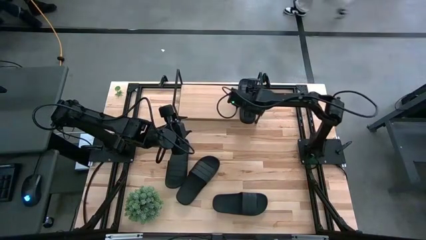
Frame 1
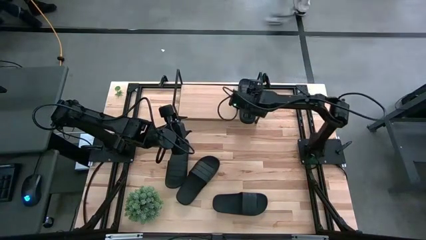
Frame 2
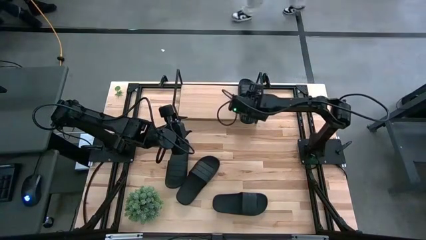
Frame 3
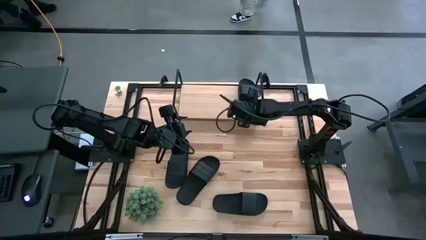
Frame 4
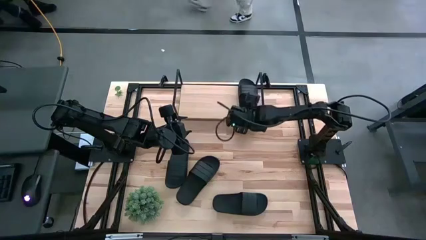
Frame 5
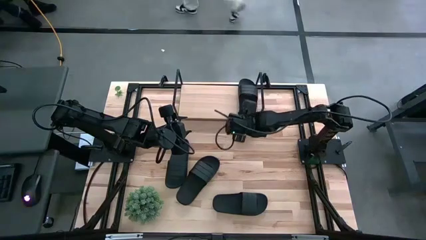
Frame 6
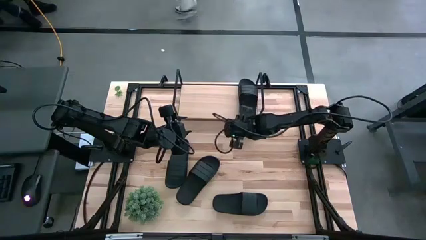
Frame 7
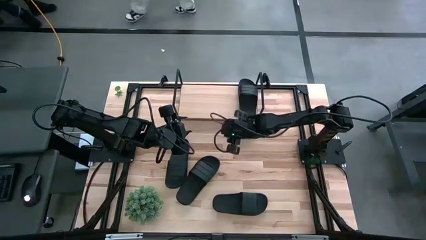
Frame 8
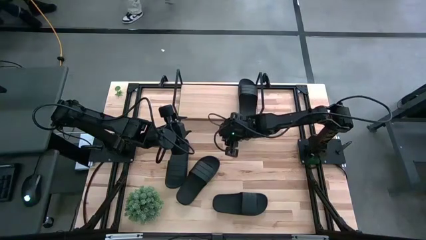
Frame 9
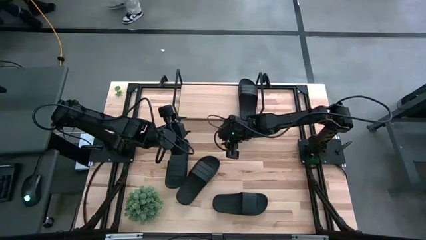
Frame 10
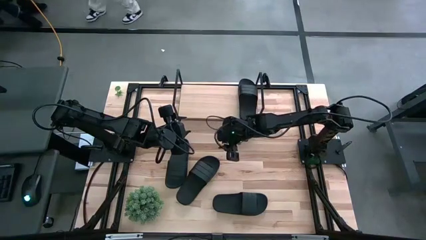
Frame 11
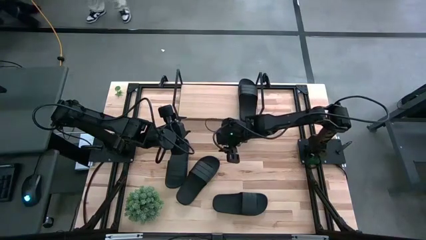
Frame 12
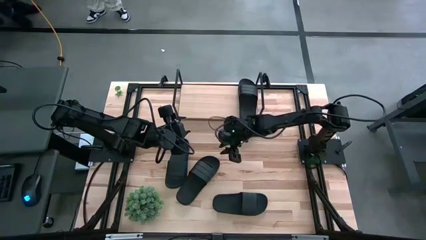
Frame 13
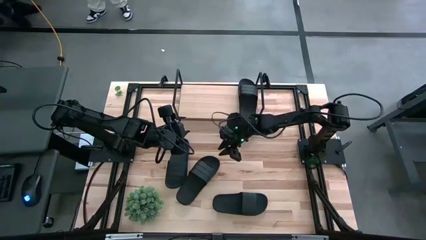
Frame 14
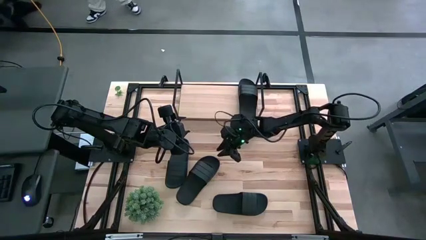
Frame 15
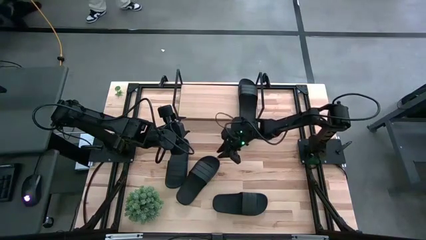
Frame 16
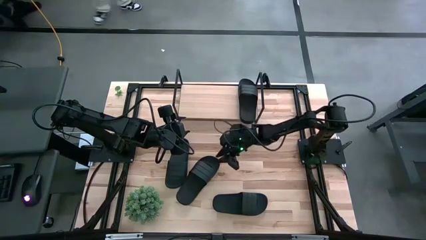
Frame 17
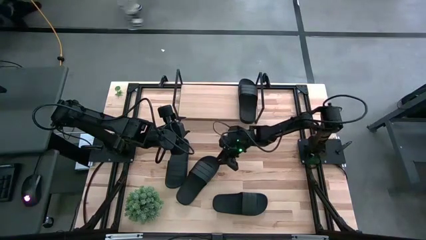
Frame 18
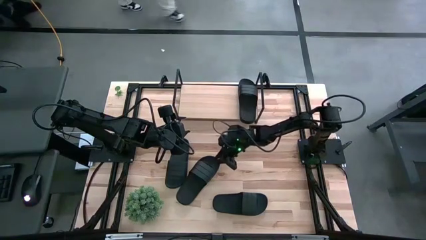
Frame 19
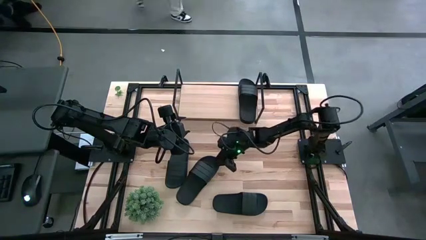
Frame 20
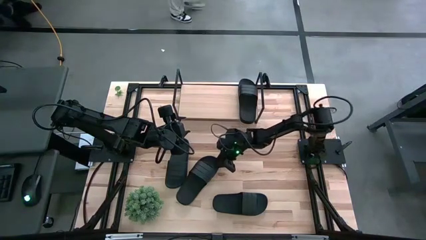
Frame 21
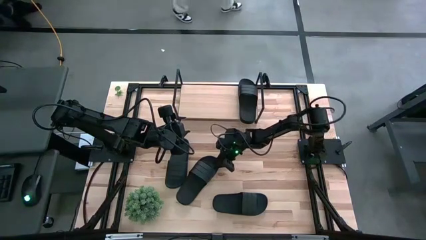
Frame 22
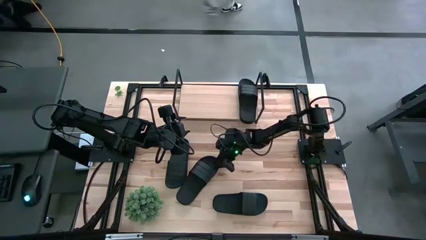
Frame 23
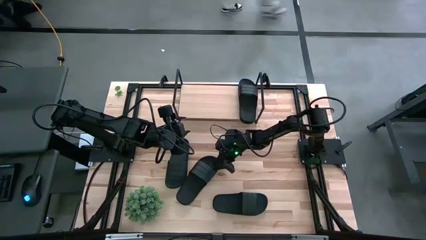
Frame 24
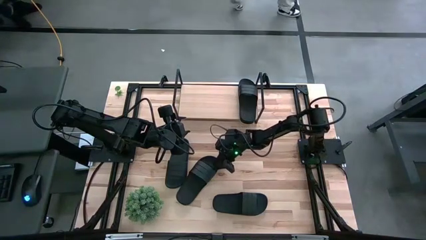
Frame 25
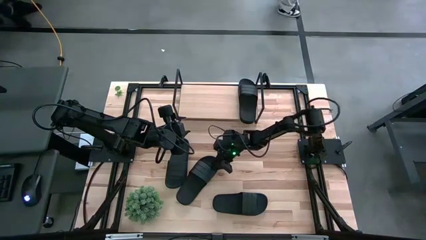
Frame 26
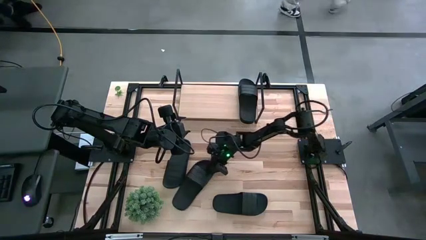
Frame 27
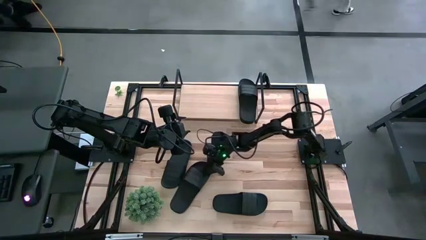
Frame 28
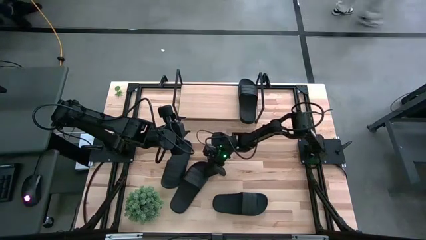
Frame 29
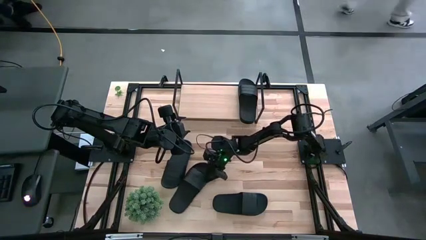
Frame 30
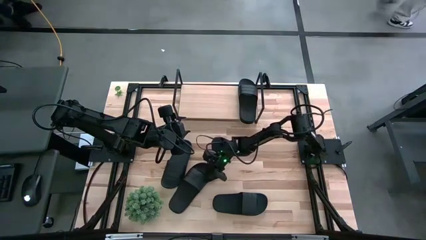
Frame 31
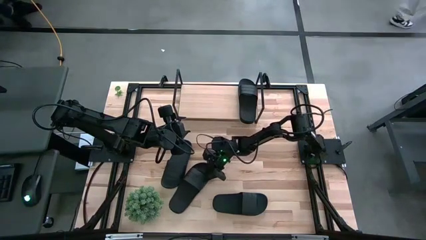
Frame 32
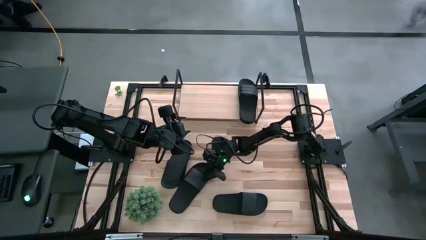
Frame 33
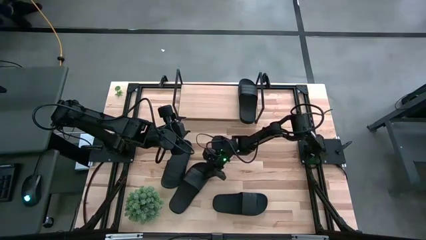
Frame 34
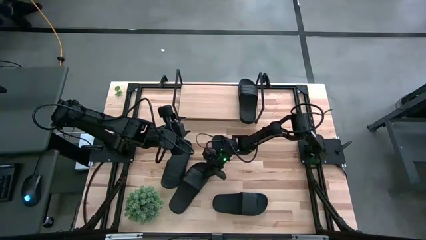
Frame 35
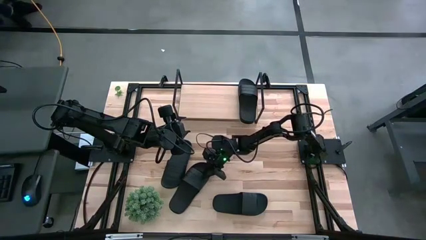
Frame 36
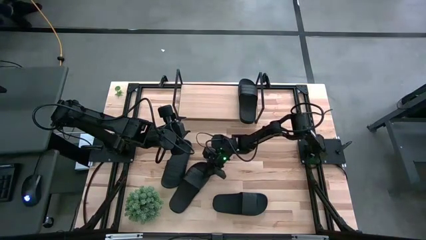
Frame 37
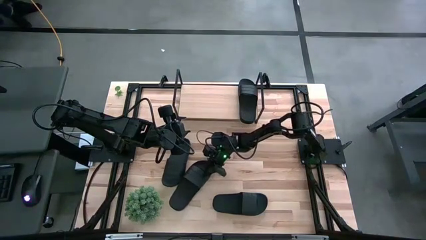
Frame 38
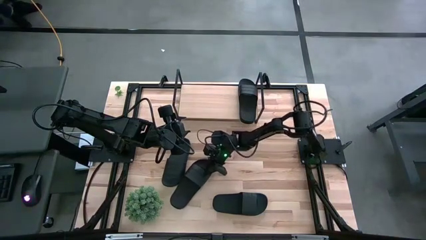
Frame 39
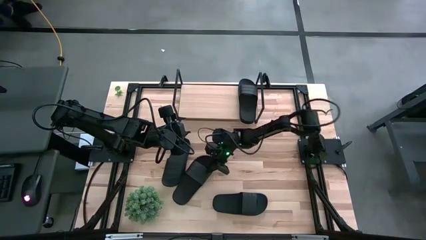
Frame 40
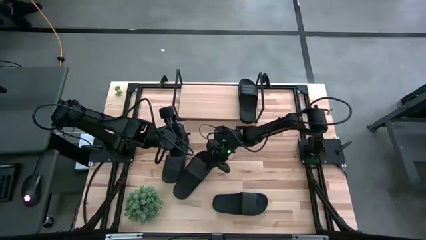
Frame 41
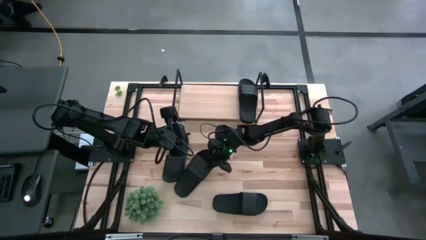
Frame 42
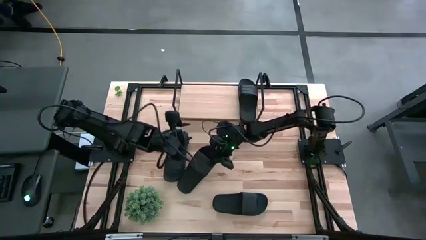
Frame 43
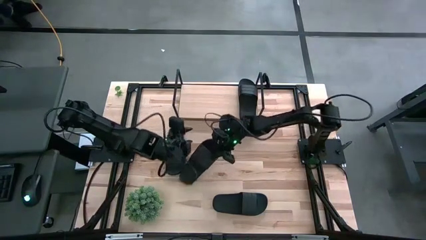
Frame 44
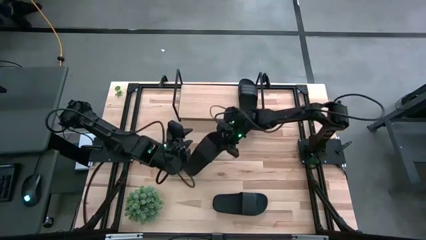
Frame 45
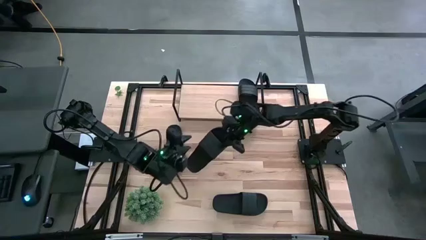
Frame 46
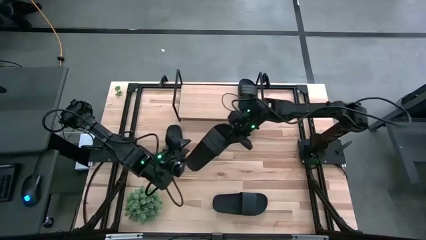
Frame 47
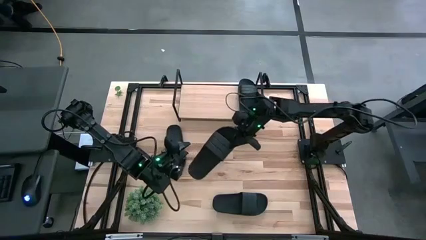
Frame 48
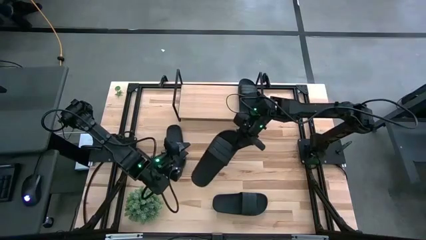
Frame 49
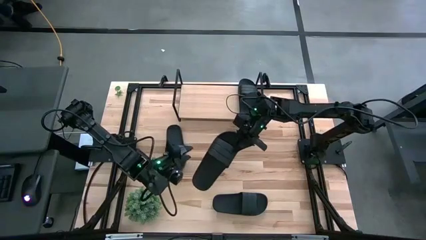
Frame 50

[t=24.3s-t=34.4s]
Task: Pick and place slides into the shelf
Put the middle black slipper on the shelf
